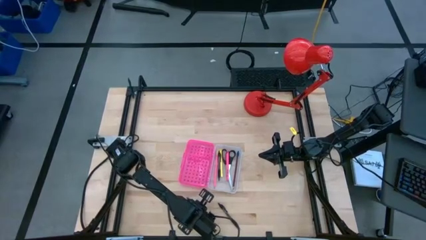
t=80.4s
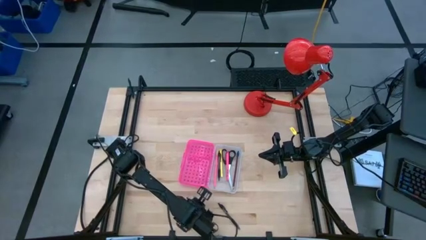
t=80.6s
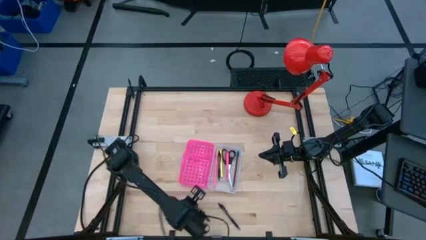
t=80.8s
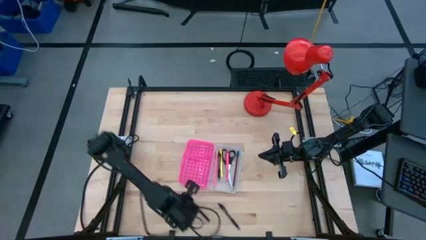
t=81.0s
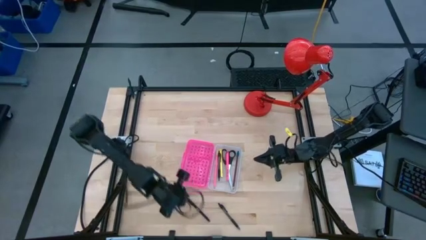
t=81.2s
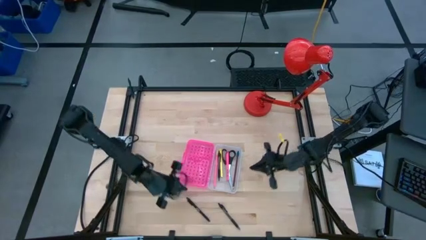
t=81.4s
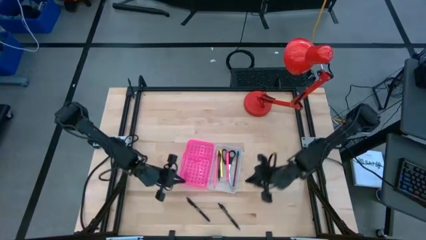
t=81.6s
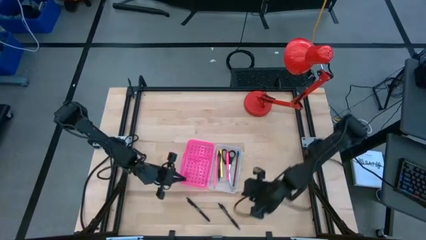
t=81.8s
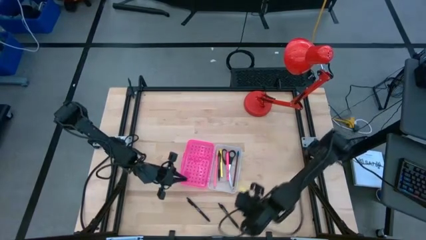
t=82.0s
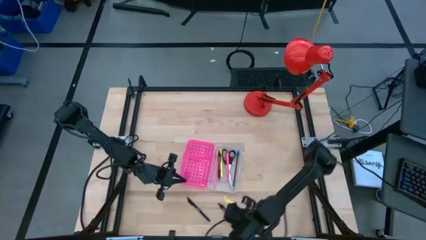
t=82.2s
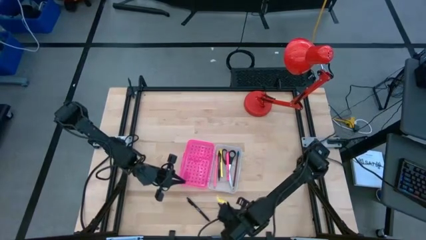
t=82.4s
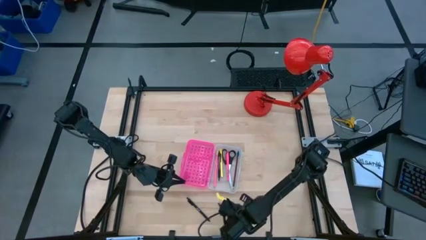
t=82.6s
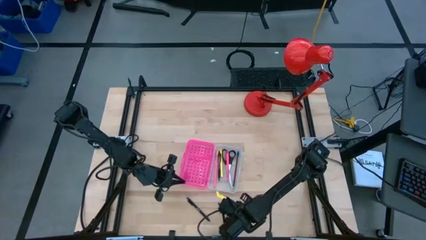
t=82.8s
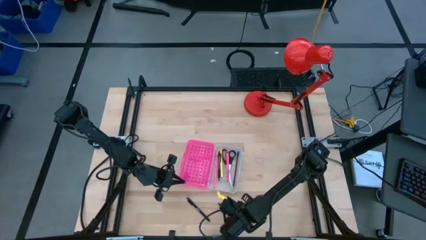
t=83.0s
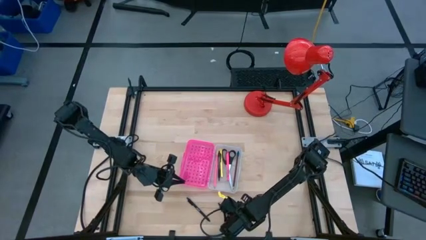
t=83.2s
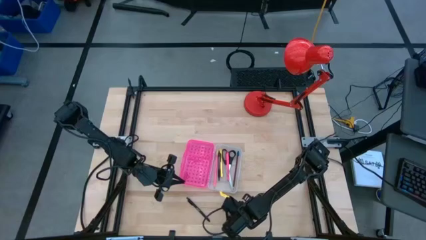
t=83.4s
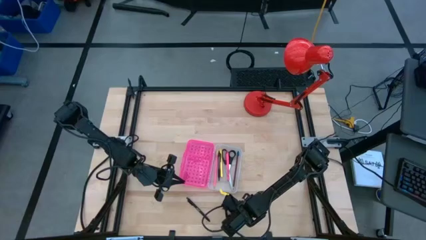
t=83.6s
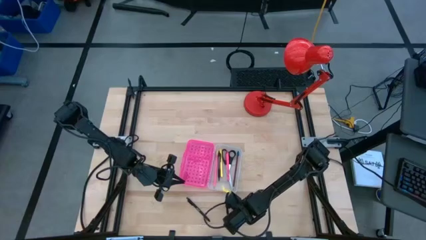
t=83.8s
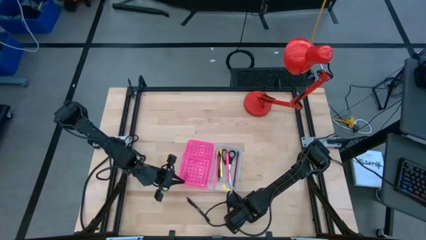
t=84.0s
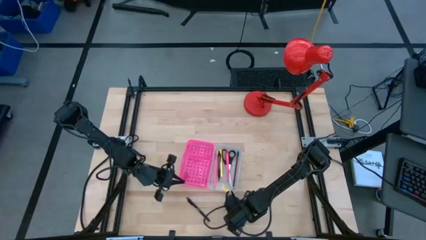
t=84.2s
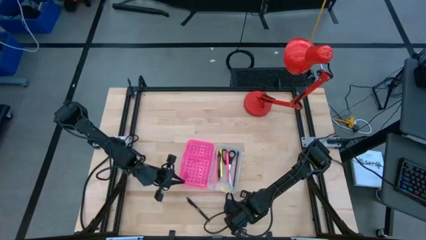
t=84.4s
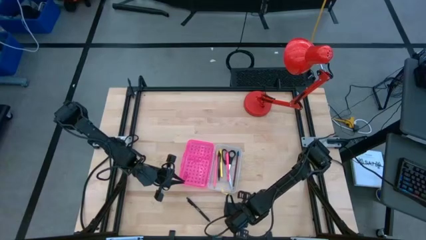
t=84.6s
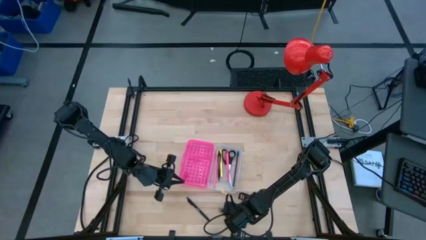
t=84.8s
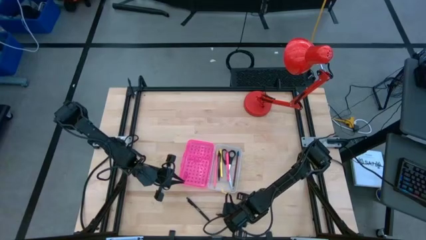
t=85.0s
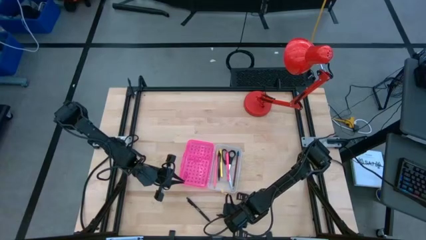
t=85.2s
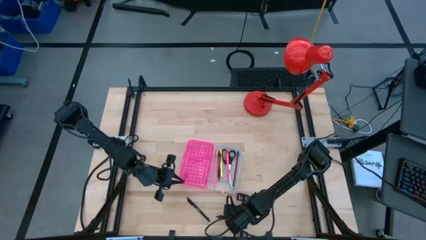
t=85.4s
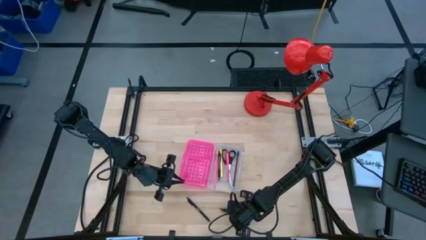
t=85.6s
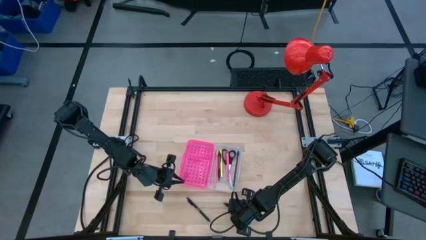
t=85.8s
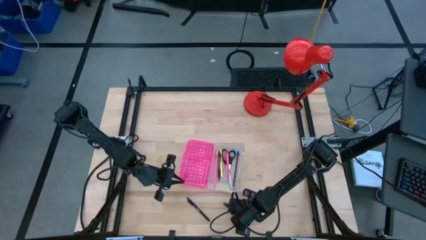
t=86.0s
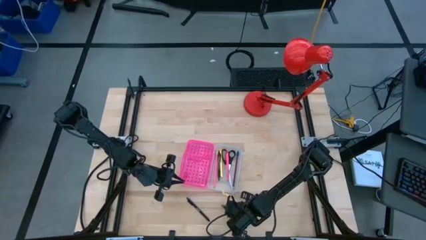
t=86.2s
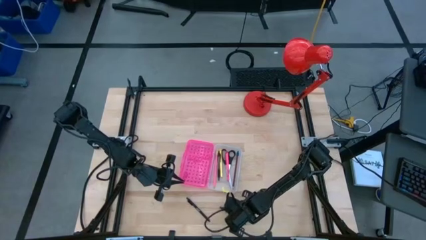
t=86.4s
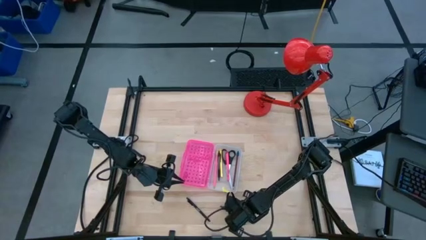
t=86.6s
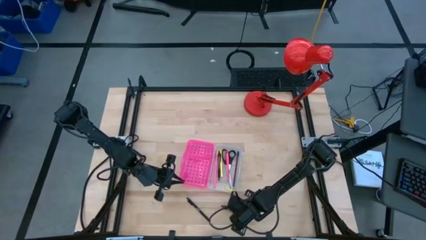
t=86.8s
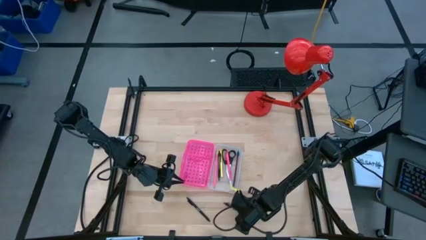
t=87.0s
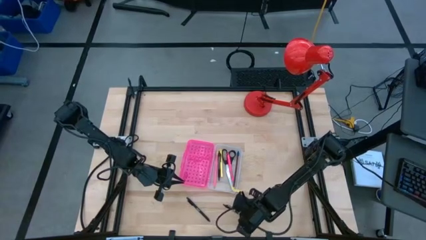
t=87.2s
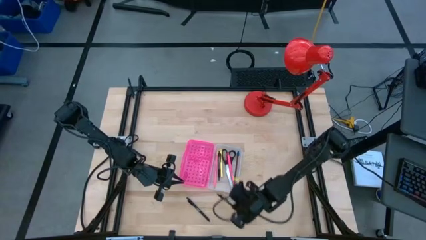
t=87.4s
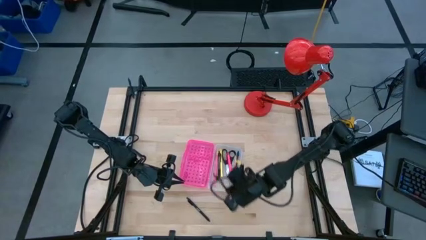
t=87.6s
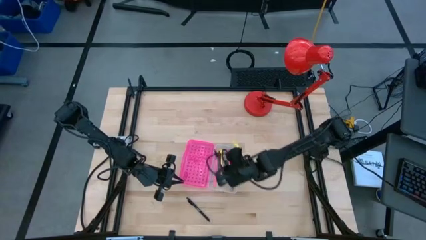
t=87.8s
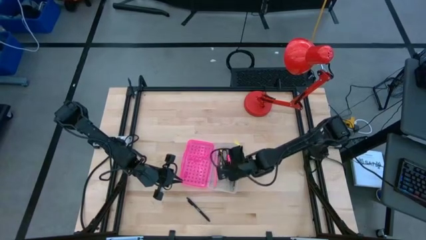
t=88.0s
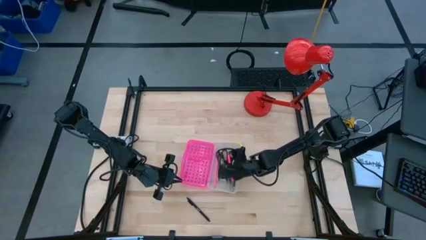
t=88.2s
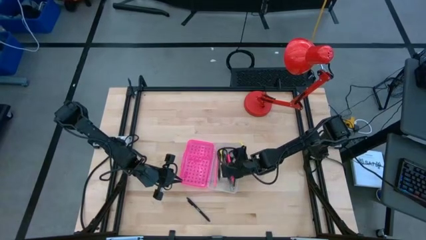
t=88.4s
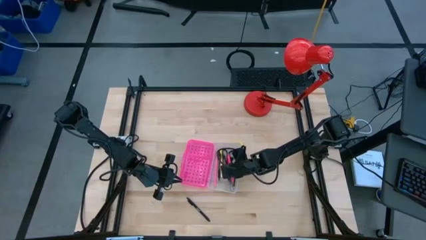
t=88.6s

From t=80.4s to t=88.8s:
Task: Pick & place school supplies into a supply box
Put the right black pen into the pink box

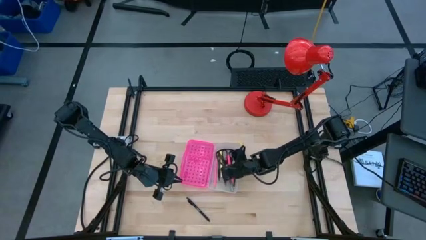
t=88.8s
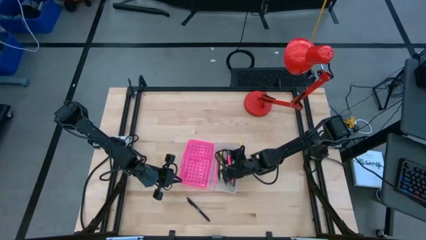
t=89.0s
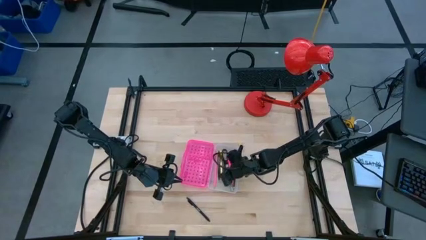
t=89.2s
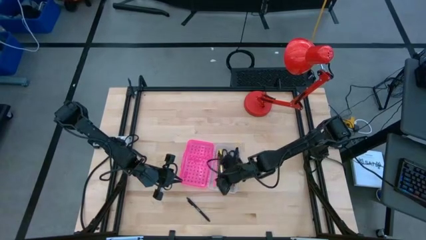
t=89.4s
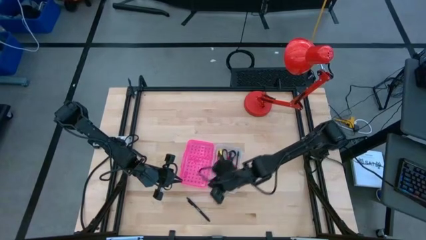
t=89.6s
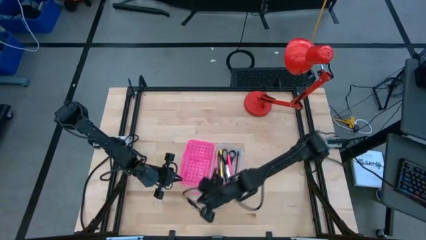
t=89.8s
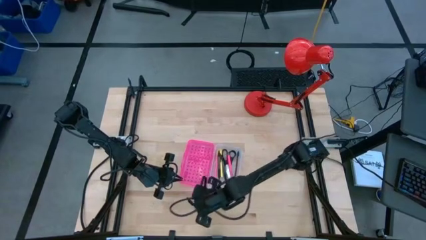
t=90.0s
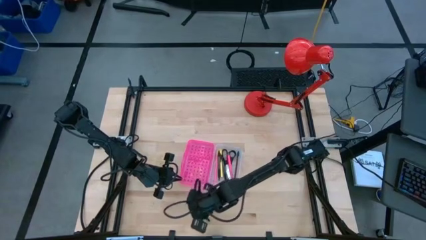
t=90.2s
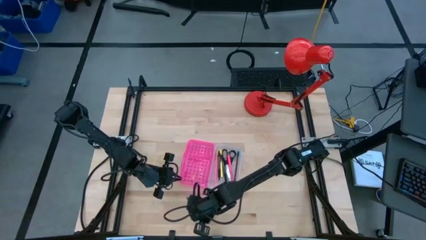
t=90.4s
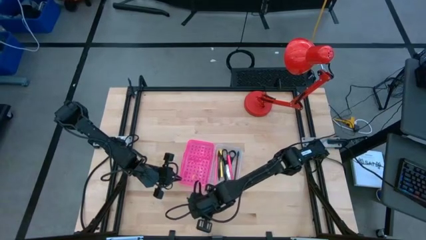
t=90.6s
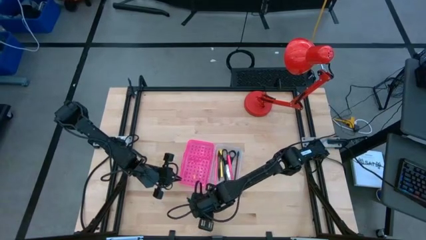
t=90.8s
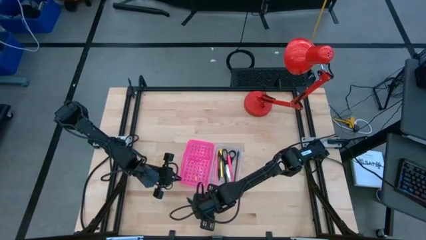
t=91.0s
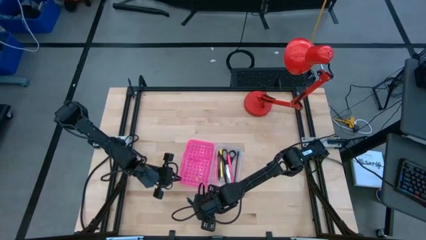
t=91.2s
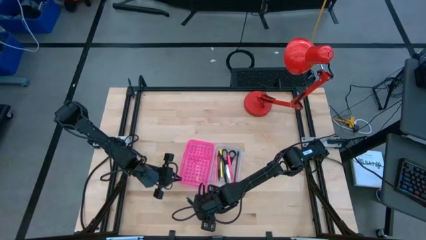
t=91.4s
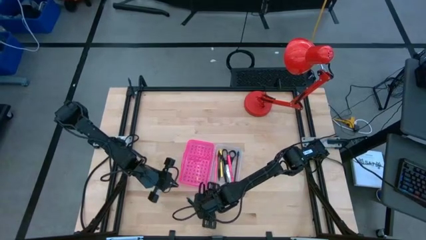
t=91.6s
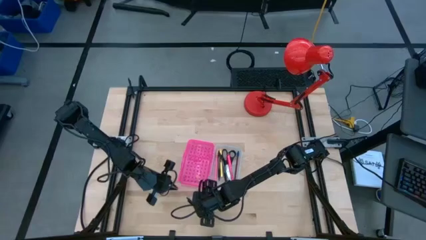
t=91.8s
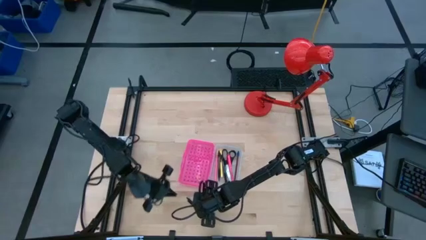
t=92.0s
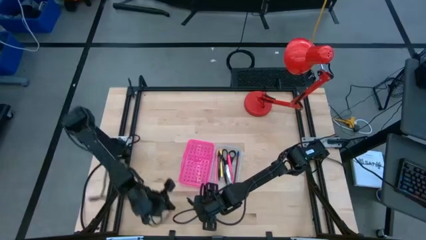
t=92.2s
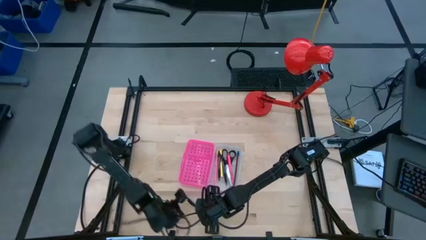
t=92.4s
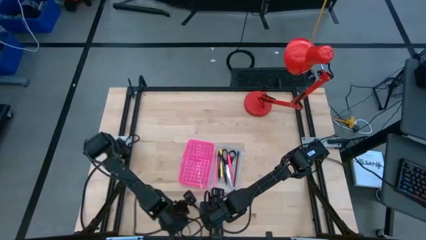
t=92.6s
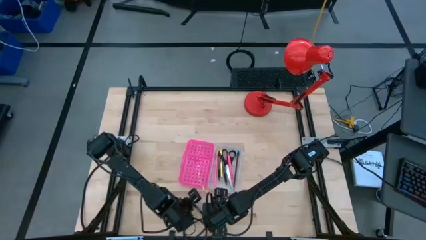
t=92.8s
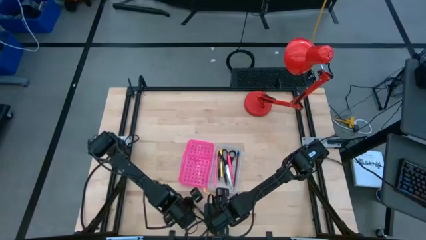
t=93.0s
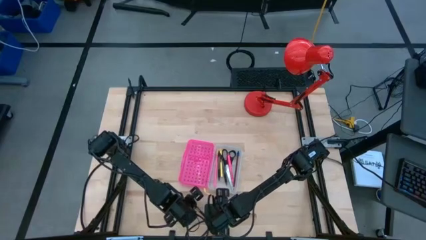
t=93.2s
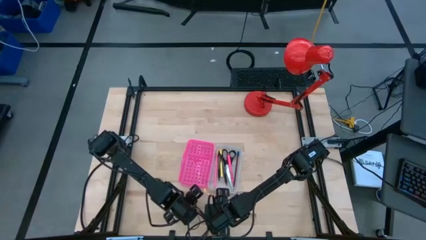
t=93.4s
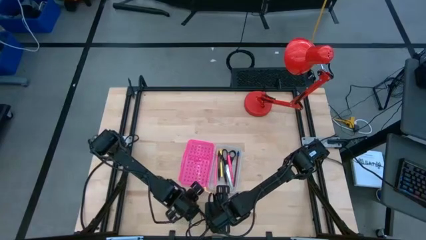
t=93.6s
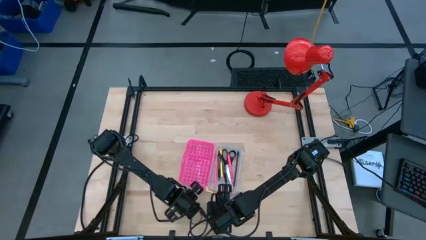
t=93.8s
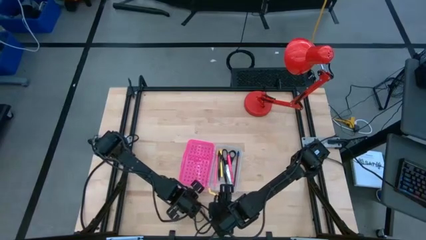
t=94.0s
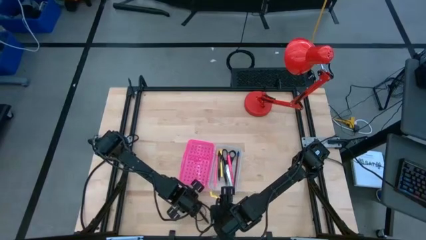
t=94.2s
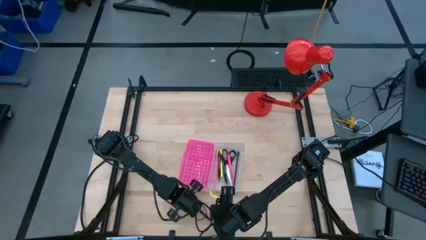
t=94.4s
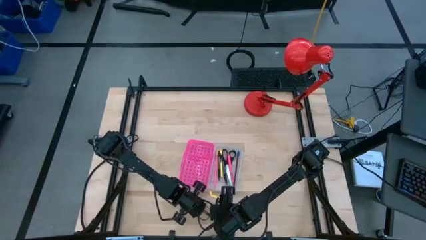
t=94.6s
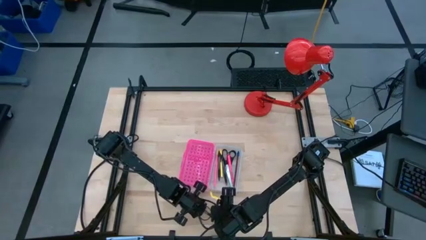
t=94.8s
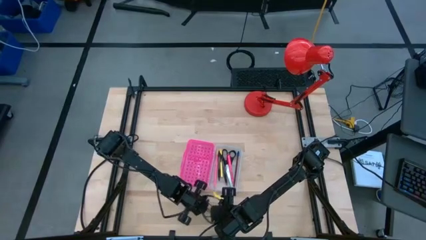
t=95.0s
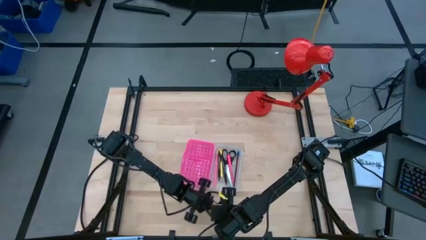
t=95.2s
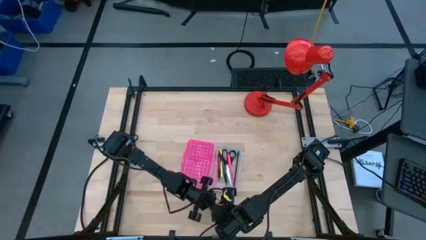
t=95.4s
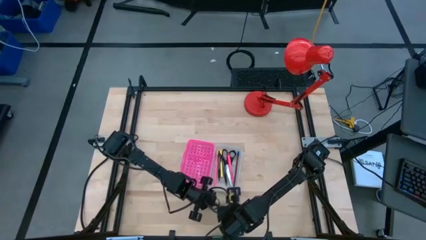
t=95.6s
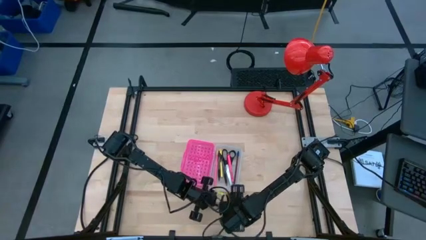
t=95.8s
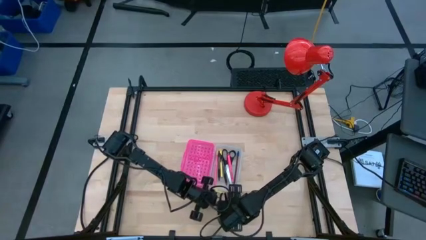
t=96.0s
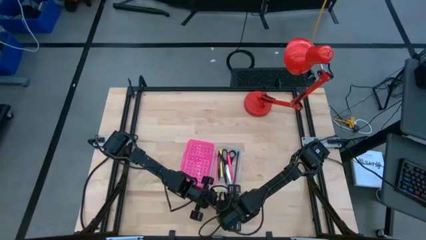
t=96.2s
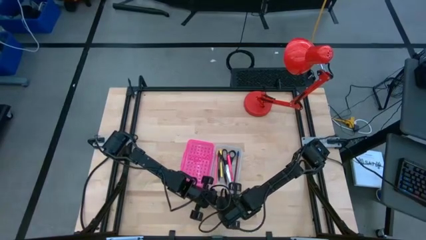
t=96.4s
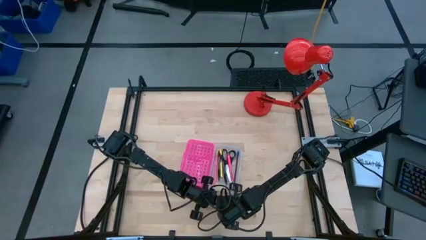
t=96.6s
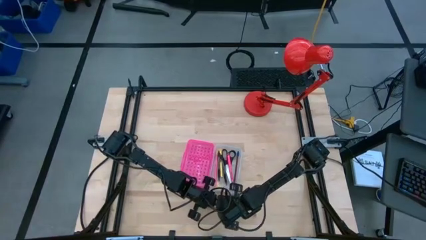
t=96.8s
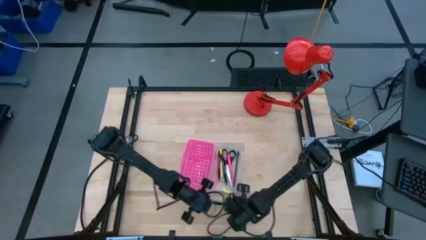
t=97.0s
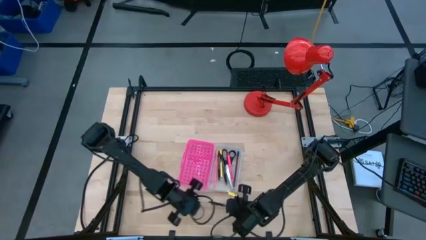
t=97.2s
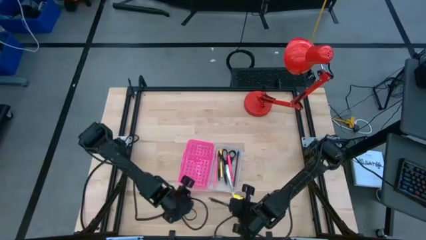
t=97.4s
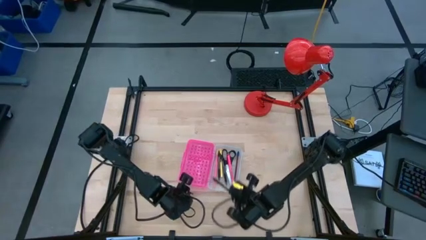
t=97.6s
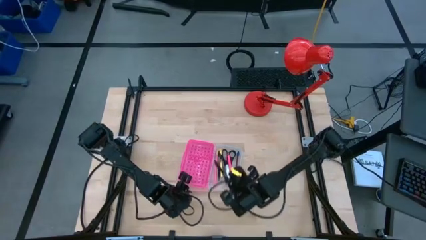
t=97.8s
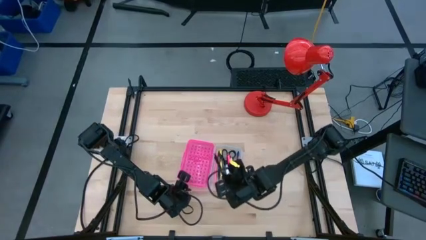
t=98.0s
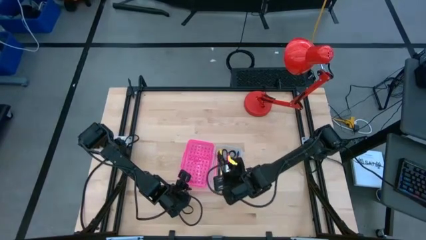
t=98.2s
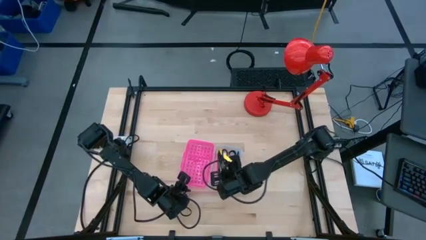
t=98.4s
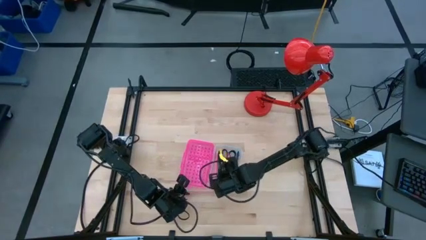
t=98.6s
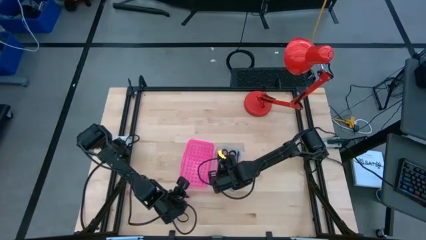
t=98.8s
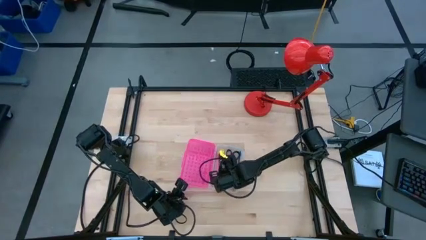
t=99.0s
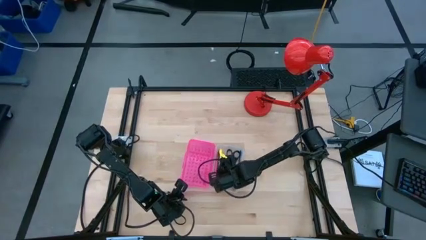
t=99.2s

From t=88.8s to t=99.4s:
Put the black pen into the pink box
